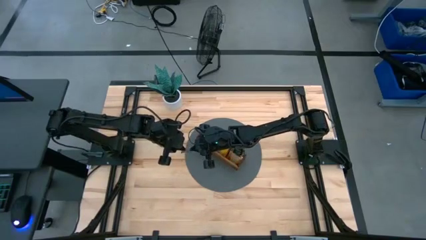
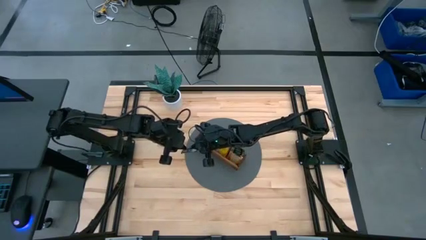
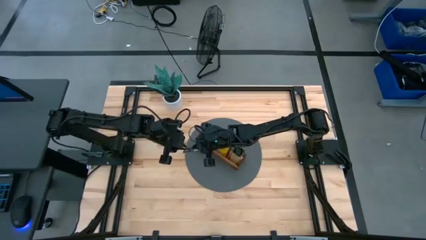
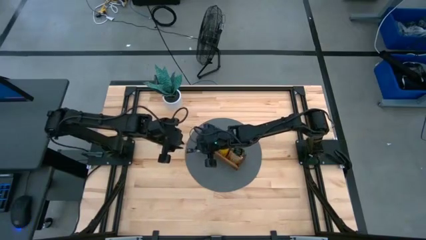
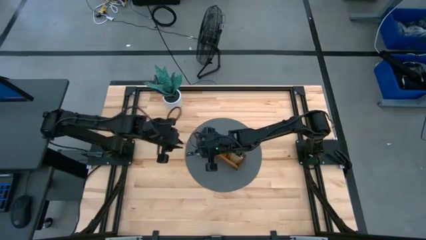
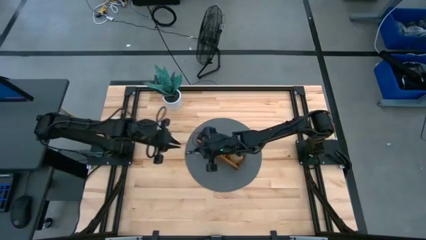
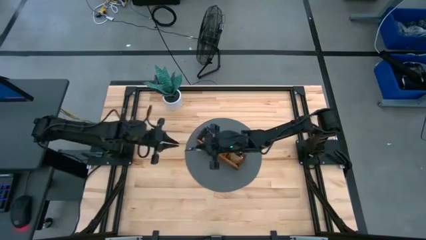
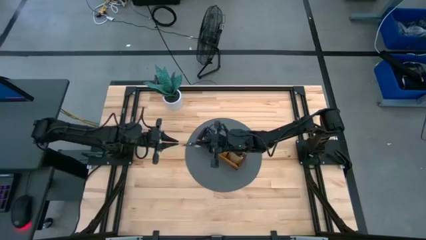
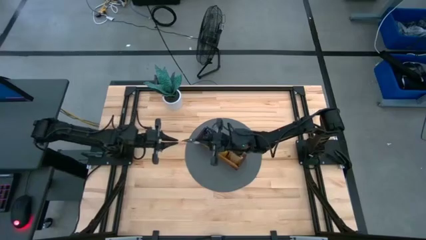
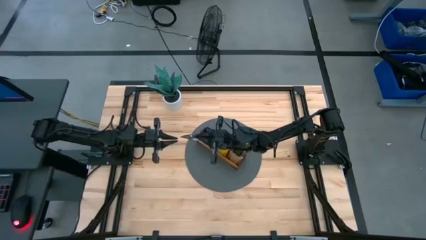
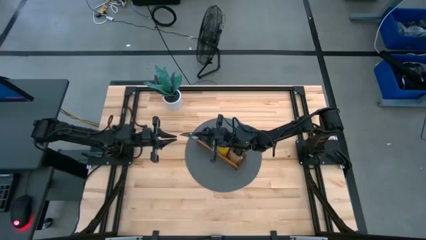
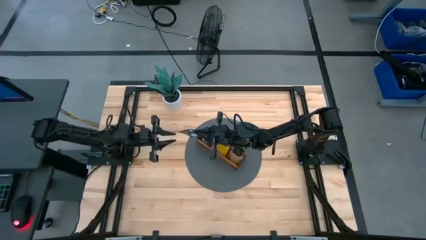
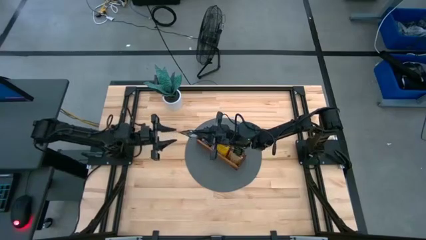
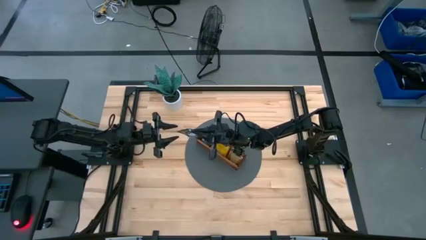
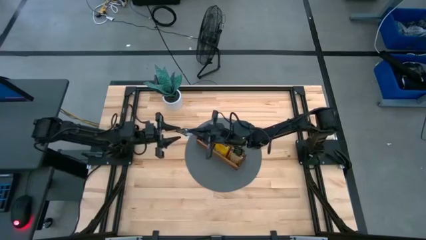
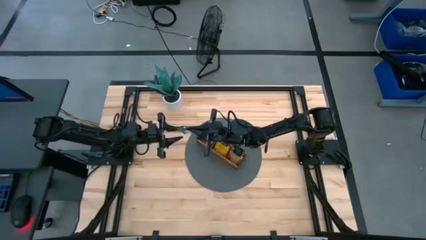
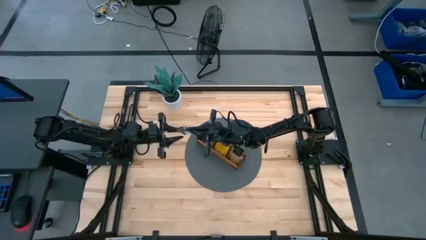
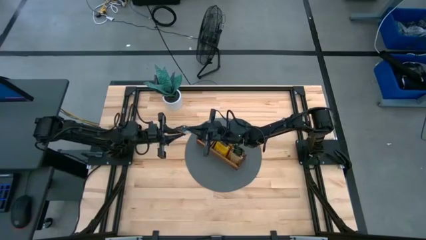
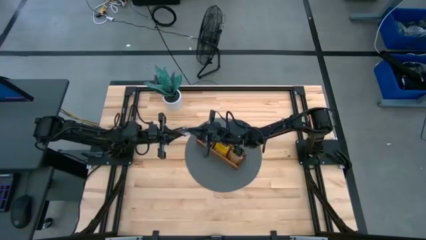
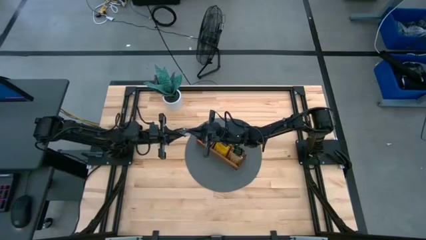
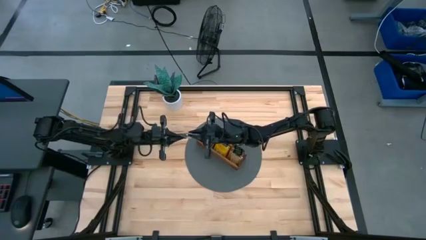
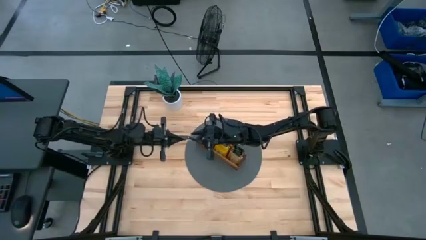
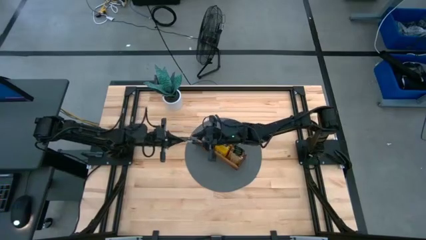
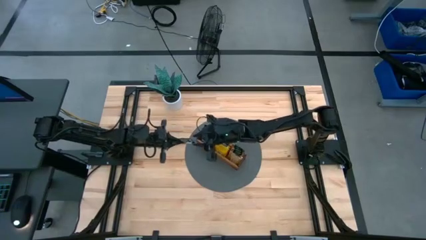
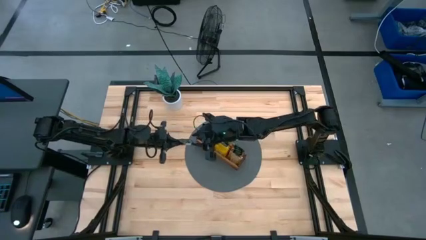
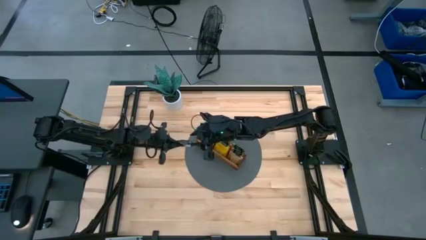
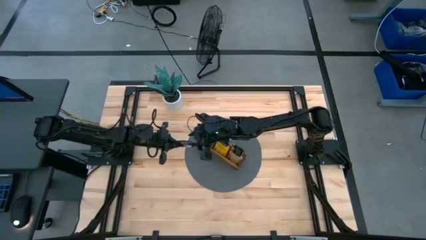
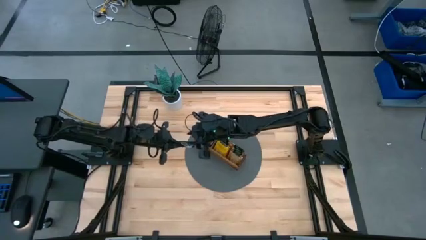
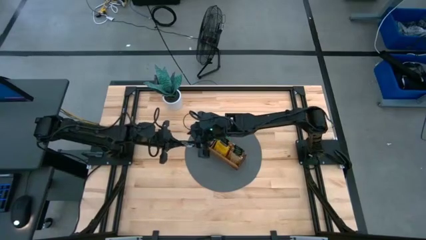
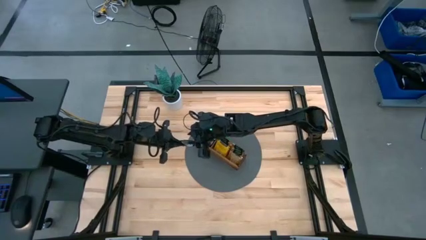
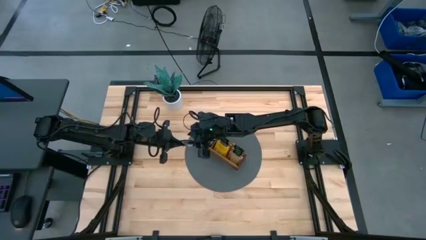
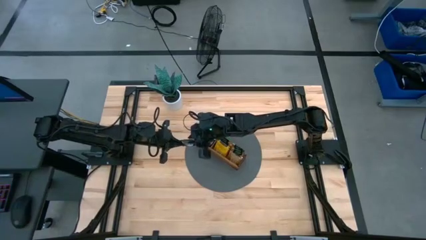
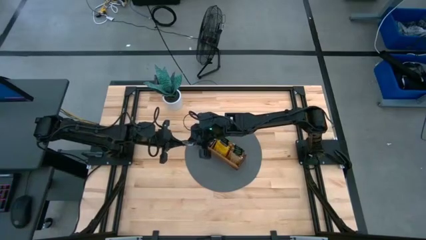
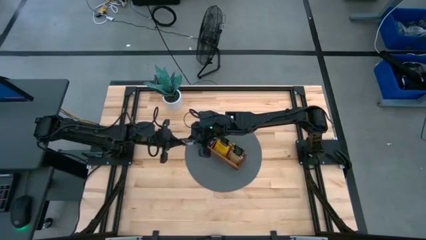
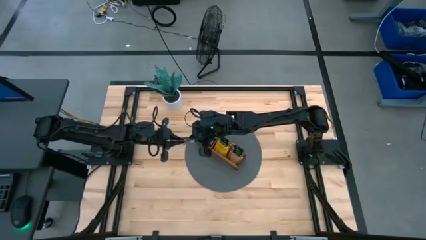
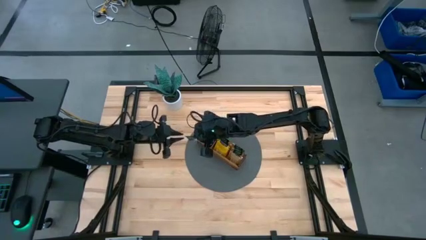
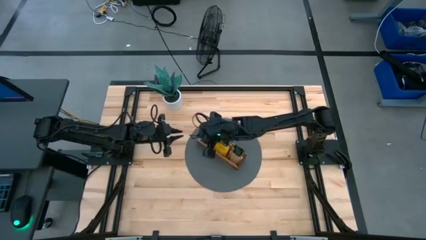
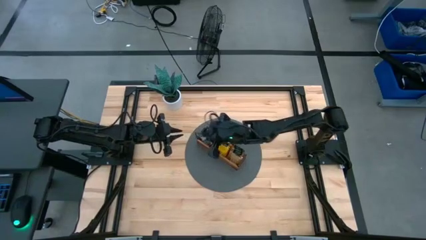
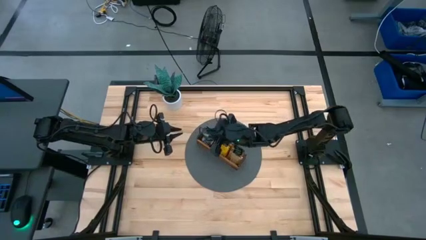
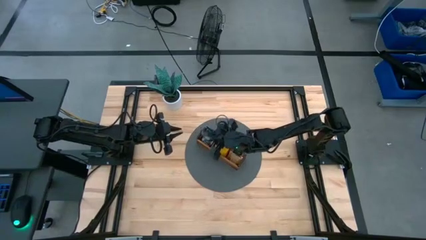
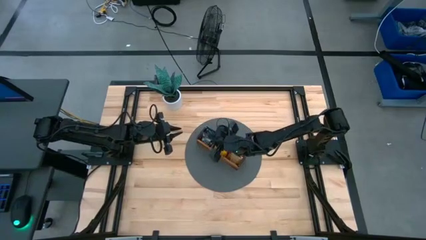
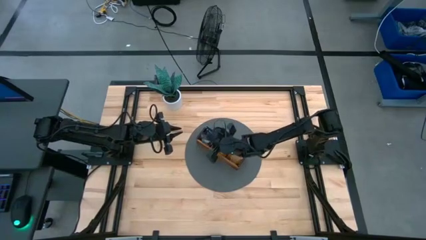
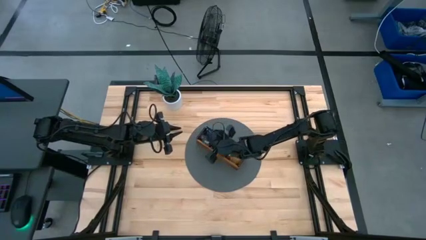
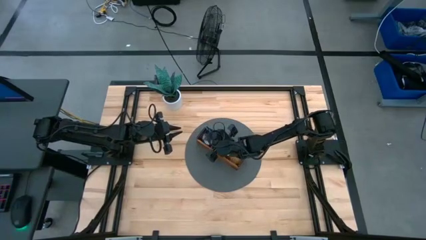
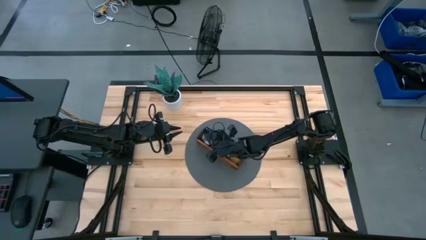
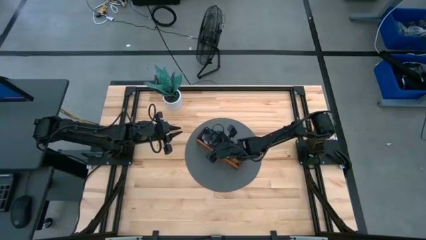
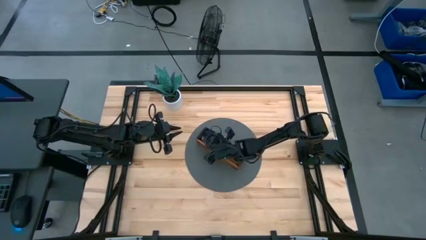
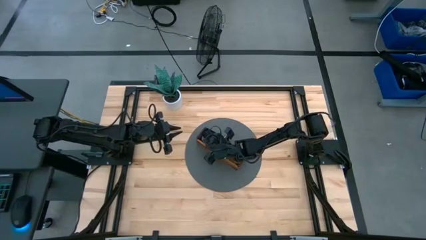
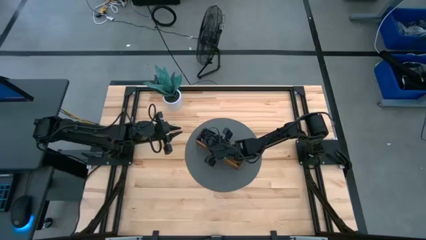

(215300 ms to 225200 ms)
Task: Pick & Place Tea
Put the dark blue tea bag into the left section of the wooden organizer

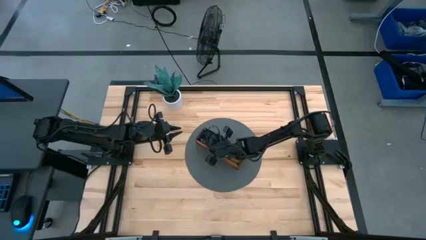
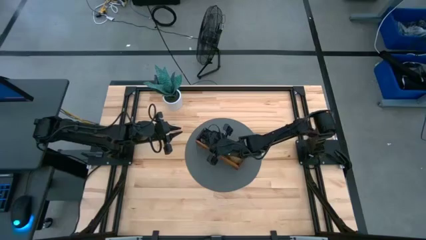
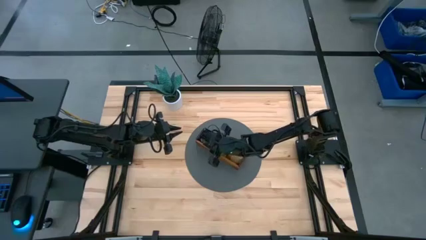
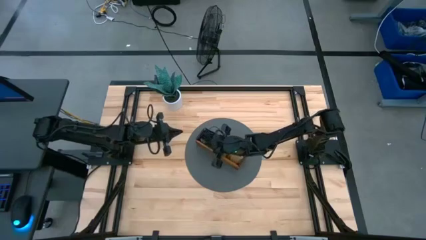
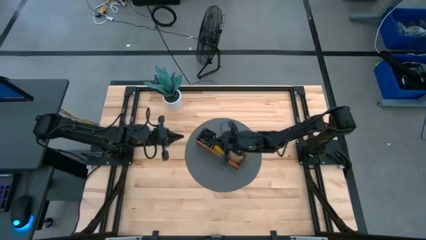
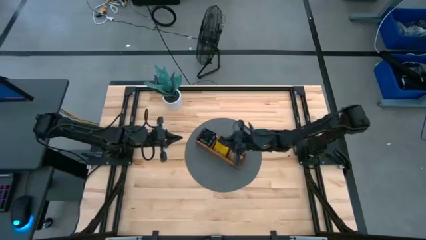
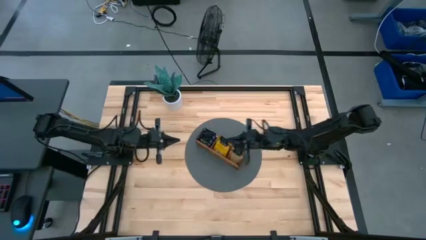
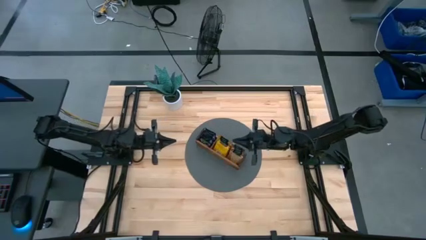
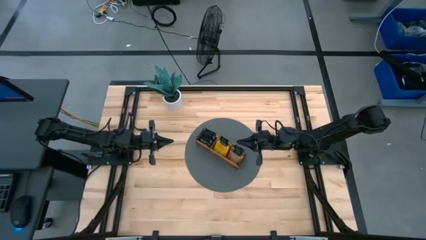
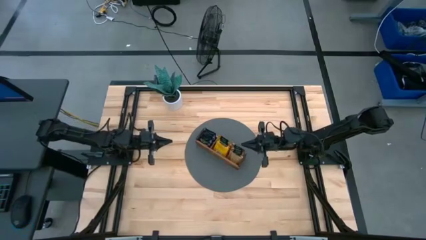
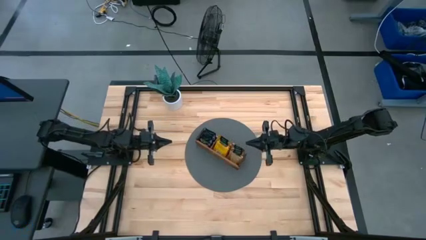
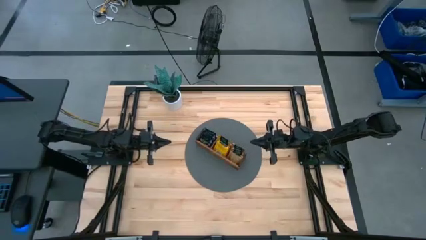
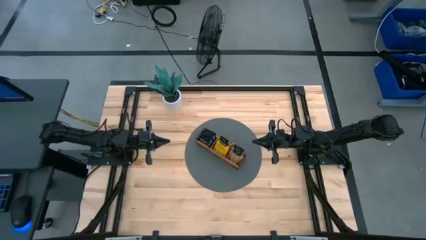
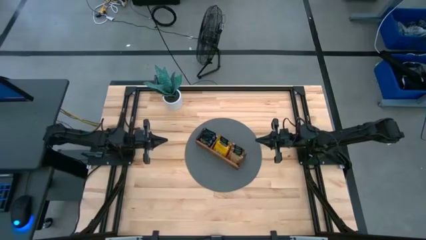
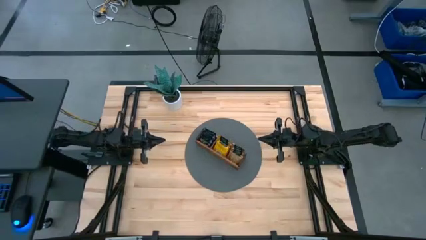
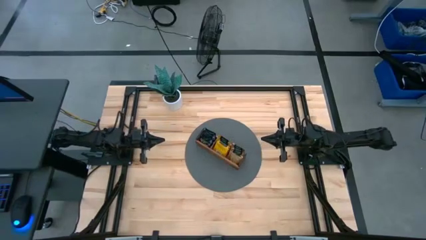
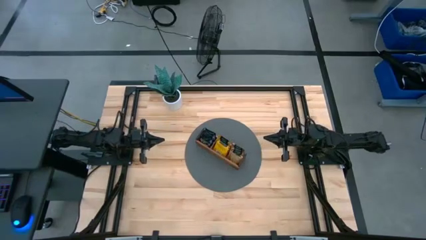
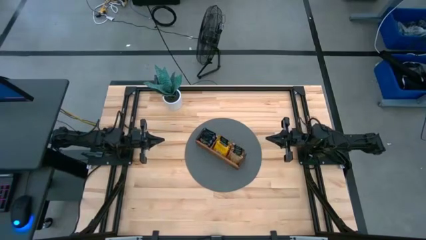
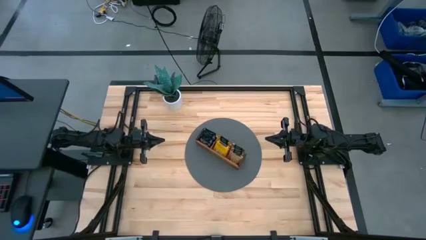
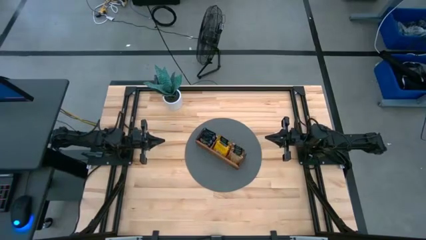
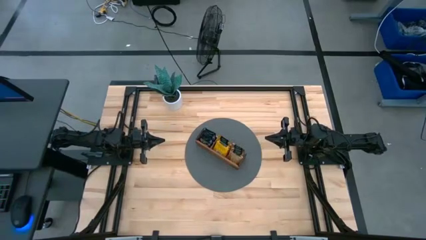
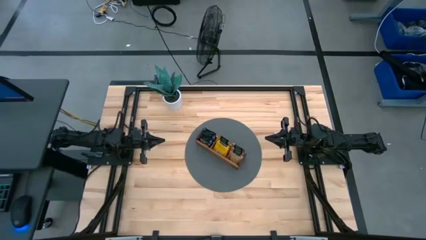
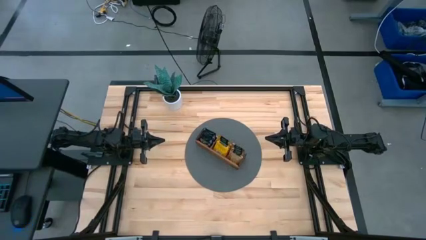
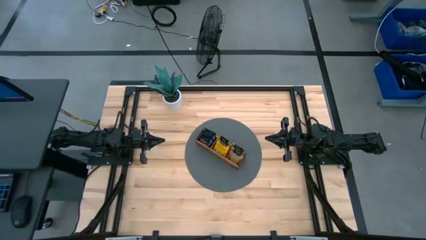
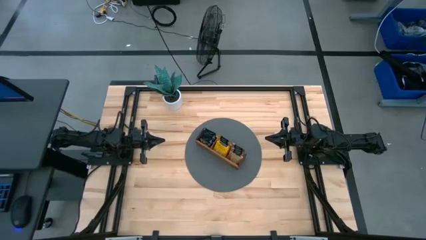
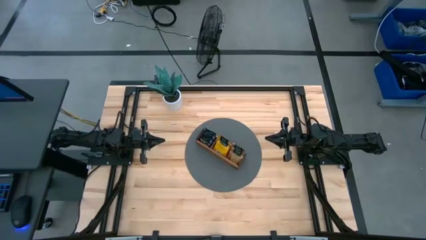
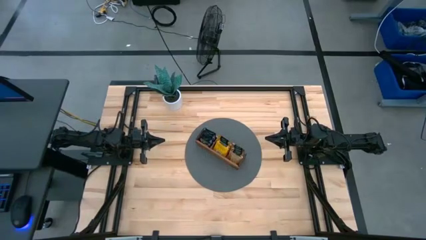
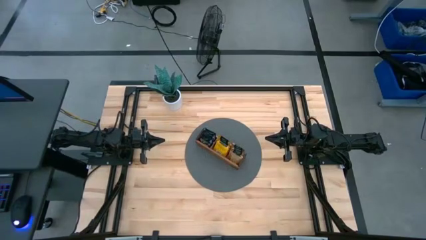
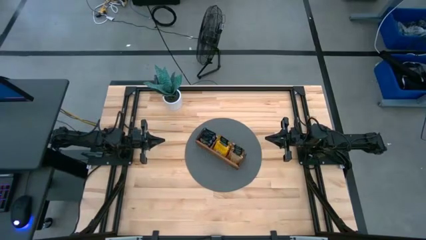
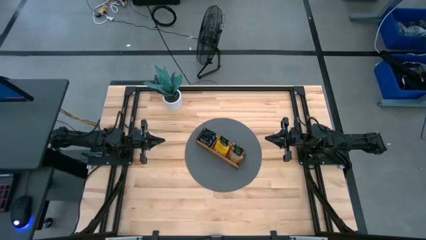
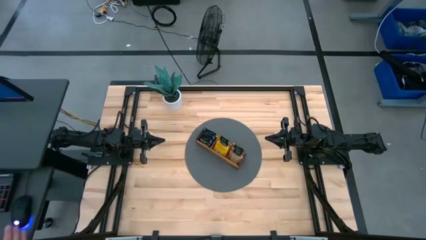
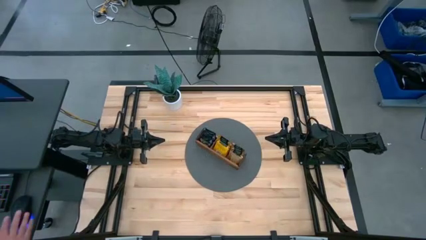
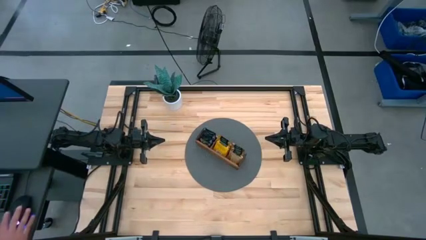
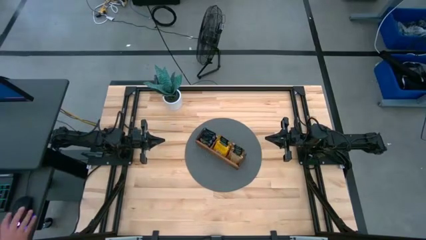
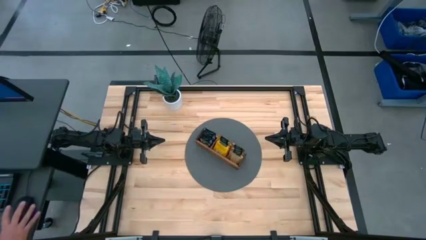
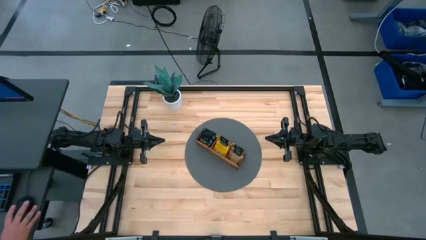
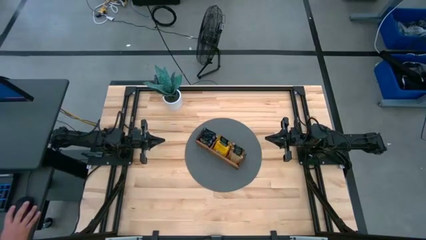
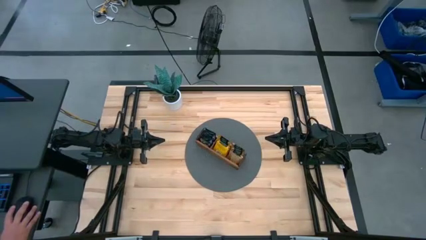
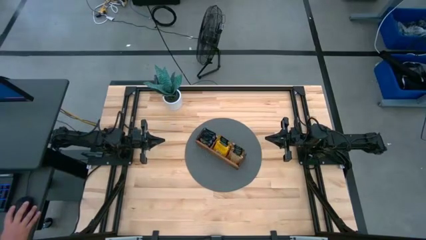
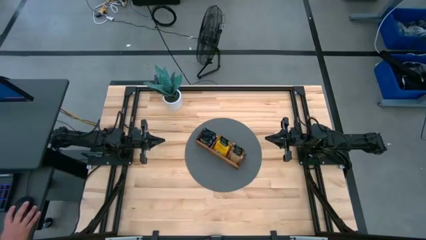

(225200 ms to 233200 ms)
Return to Home Position
